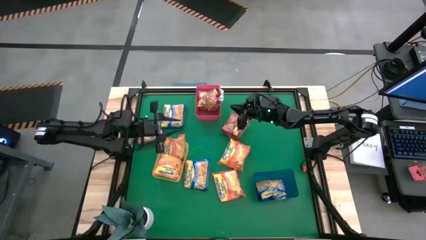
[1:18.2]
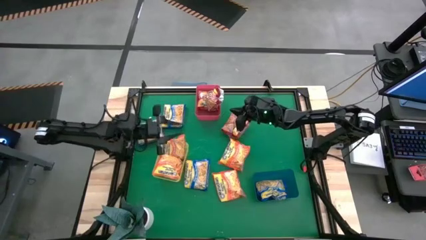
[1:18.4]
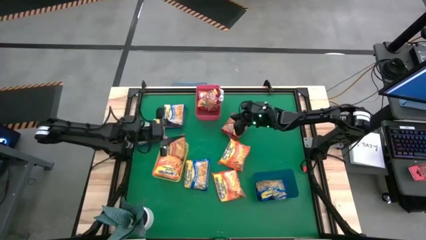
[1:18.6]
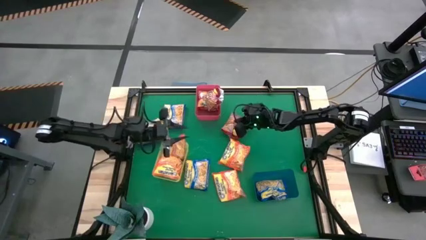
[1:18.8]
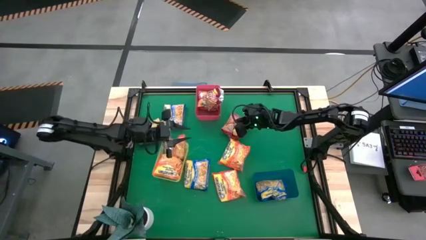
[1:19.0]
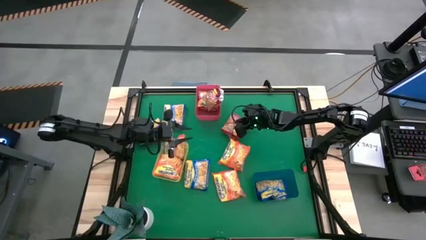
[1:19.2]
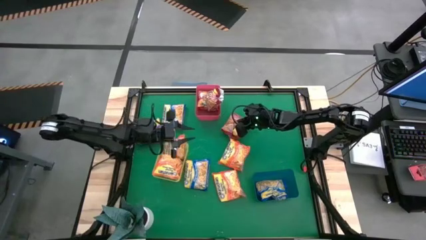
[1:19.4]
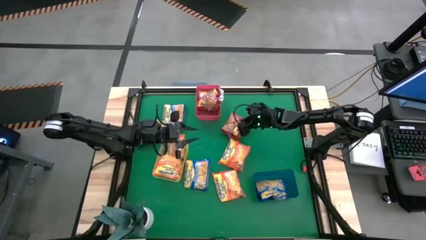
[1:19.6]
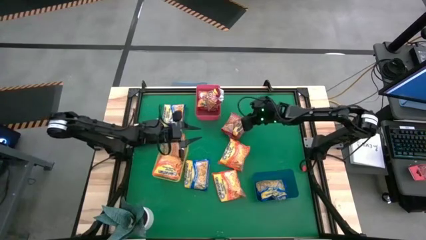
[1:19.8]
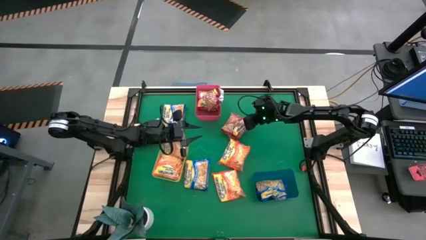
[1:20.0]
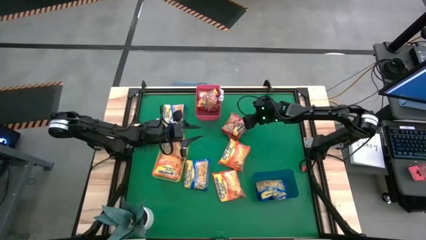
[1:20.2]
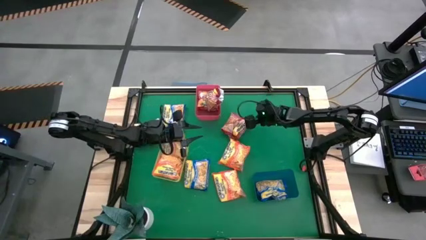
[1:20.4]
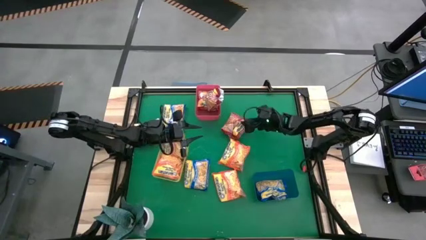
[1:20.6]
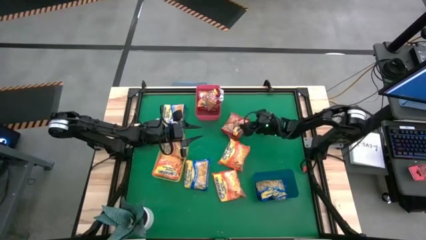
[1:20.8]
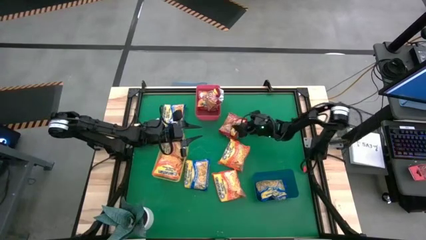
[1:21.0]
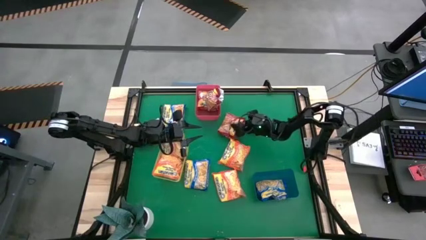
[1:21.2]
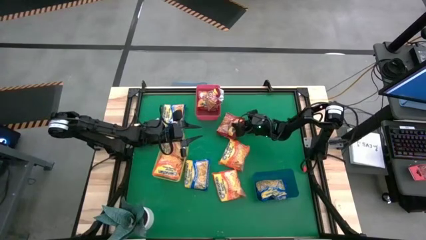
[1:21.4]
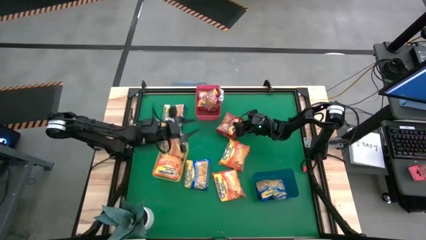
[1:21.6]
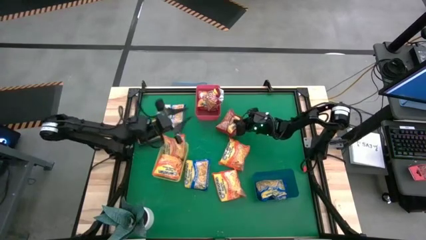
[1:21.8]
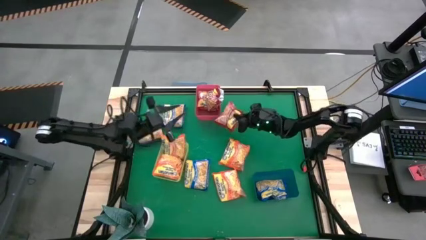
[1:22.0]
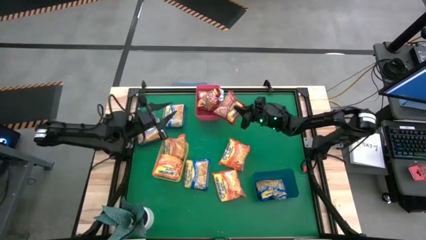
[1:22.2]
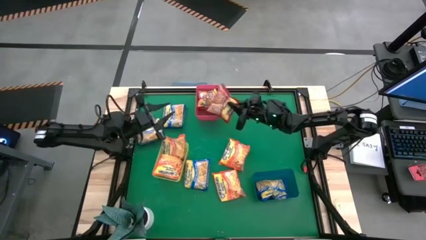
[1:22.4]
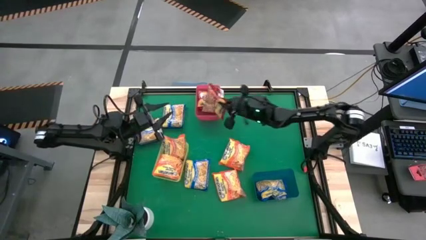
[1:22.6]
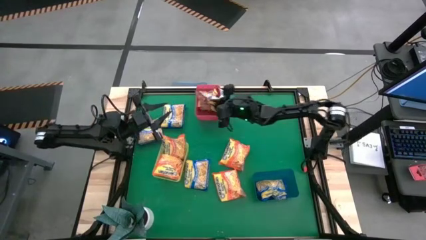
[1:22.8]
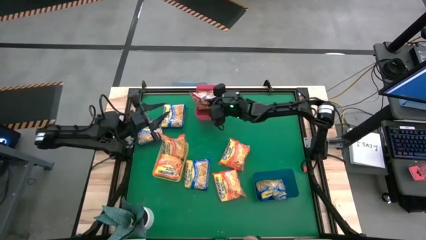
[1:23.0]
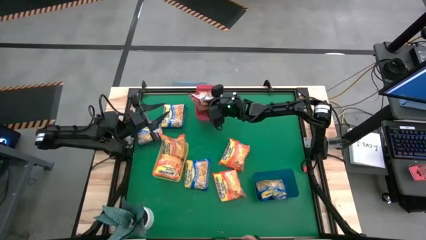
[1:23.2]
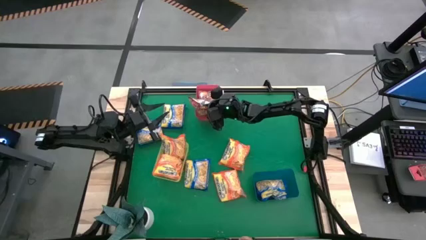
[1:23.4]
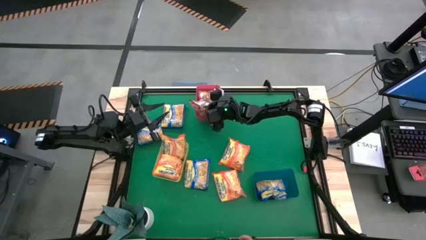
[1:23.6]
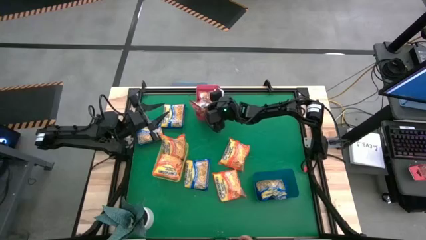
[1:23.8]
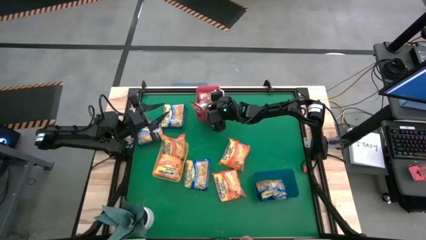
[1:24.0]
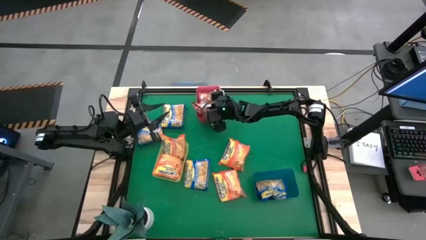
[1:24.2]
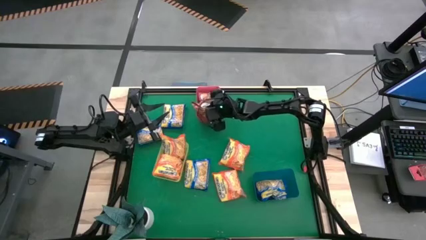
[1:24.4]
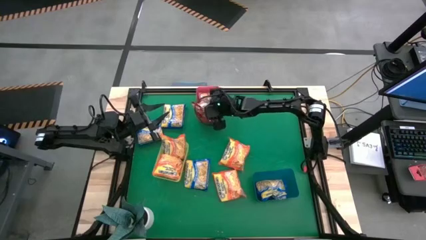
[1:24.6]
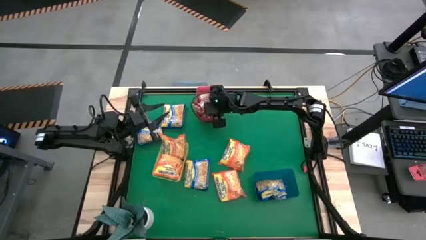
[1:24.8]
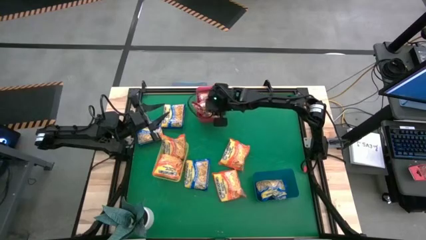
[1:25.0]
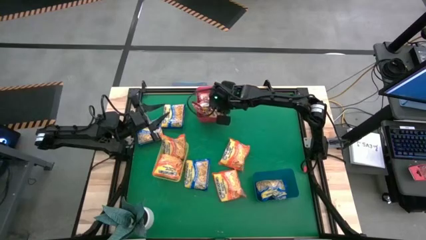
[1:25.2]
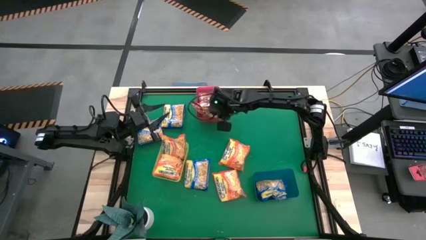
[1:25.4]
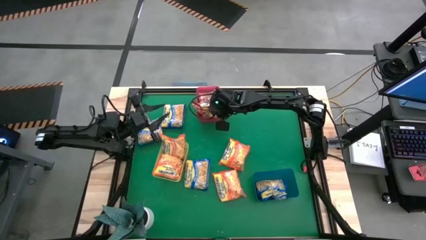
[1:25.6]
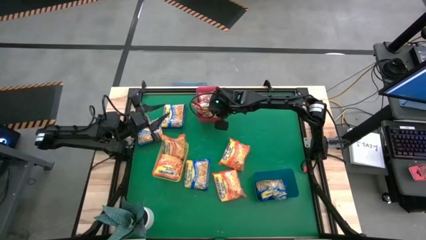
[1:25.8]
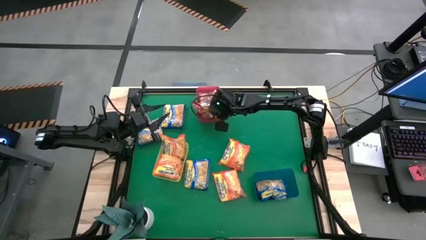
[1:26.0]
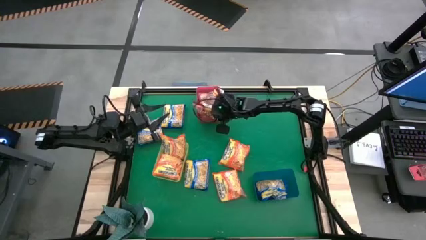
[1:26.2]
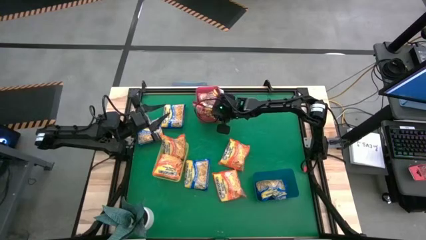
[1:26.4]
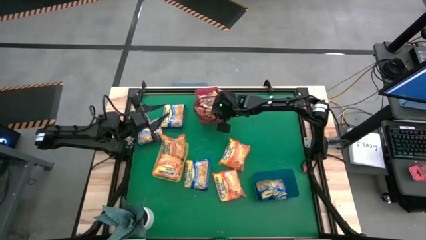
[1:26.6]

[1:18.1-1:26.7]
Task: Sort Maruchan noodles
Put the noodle pack into the red bin

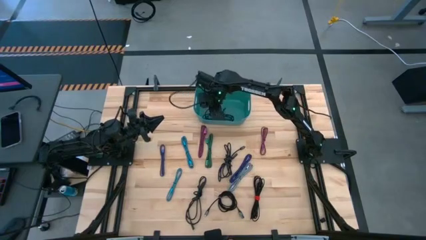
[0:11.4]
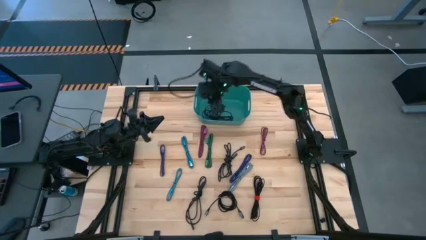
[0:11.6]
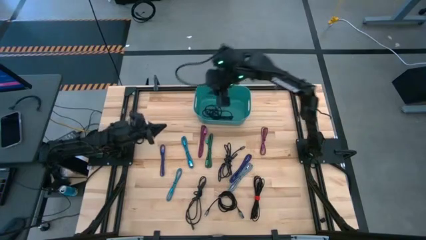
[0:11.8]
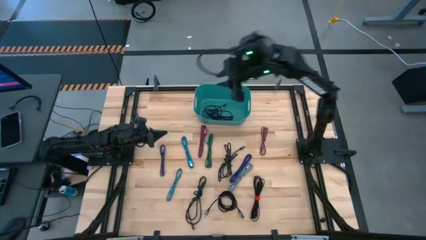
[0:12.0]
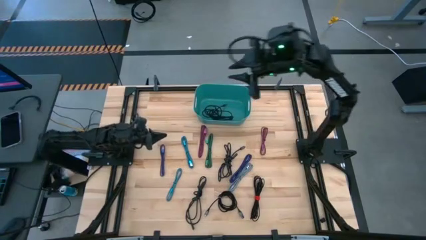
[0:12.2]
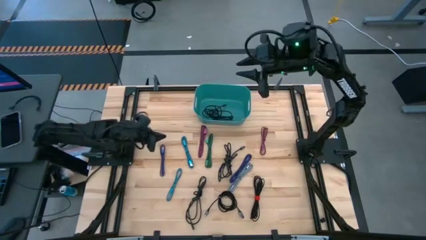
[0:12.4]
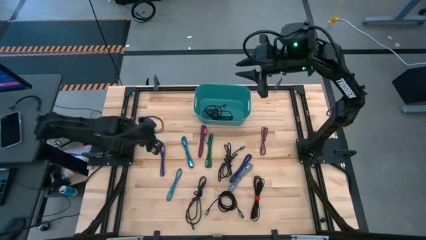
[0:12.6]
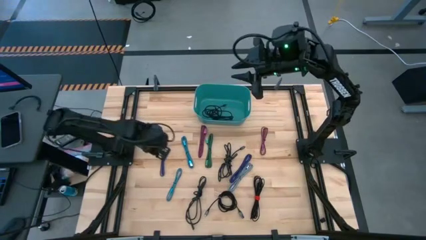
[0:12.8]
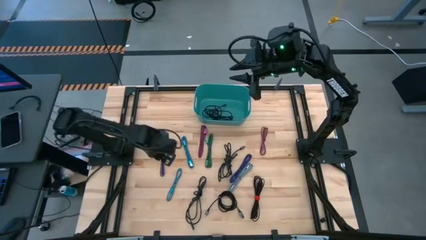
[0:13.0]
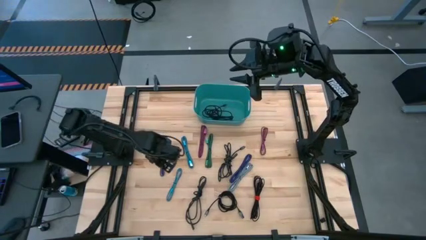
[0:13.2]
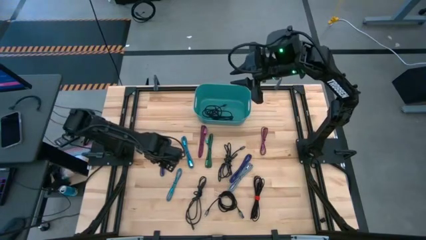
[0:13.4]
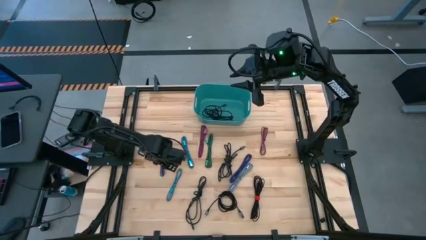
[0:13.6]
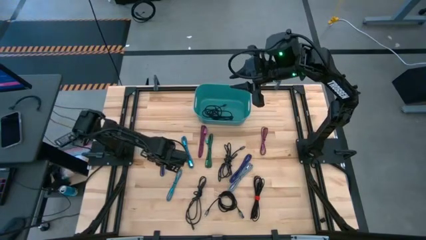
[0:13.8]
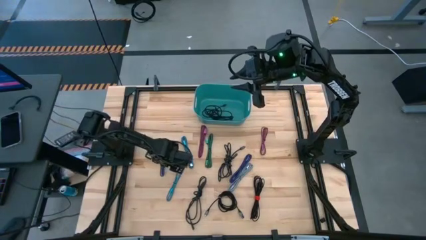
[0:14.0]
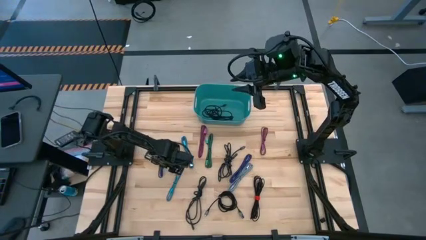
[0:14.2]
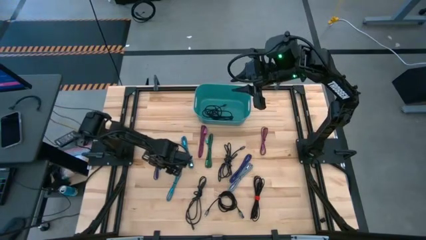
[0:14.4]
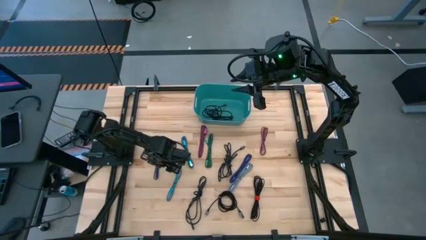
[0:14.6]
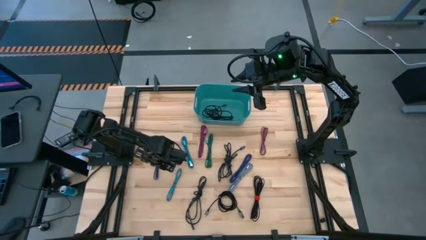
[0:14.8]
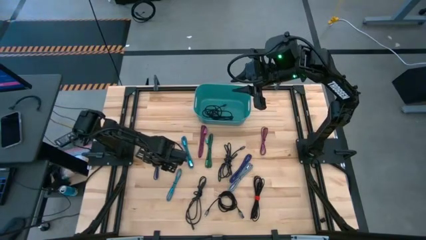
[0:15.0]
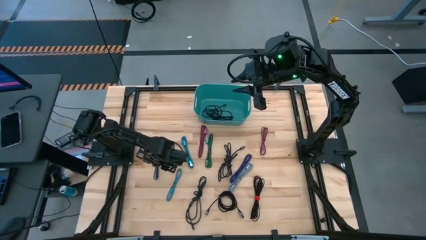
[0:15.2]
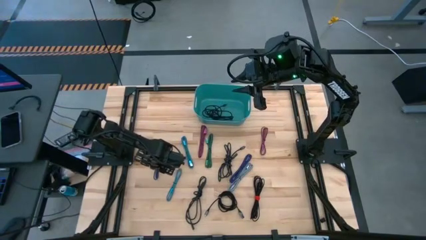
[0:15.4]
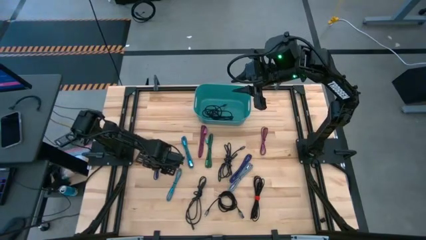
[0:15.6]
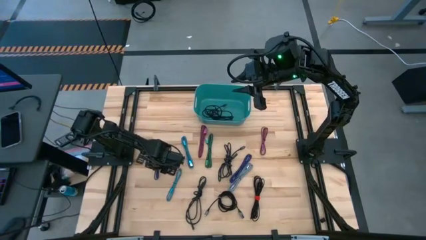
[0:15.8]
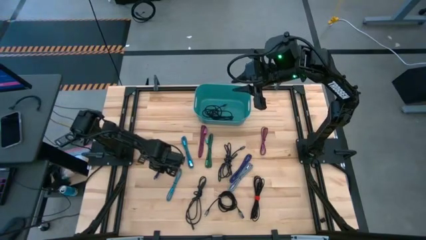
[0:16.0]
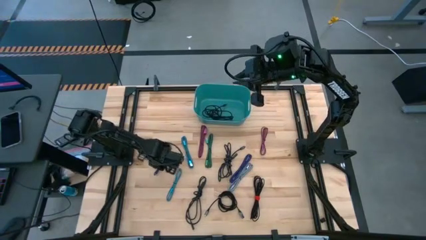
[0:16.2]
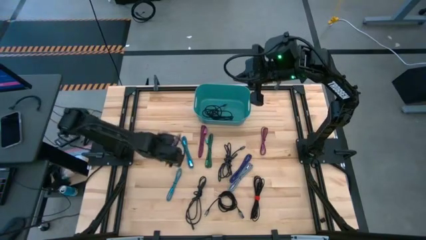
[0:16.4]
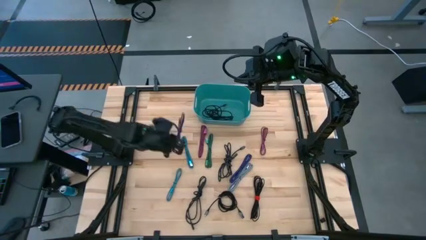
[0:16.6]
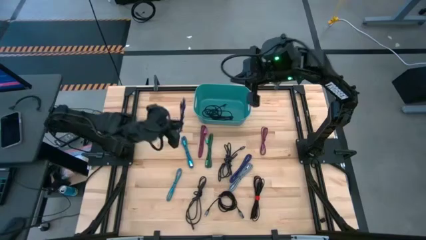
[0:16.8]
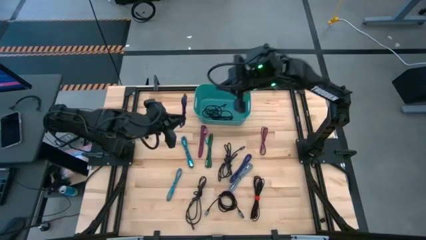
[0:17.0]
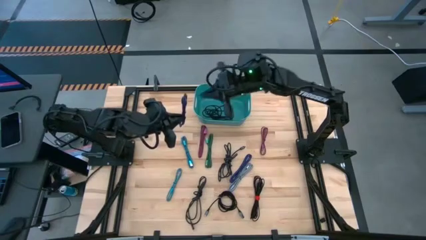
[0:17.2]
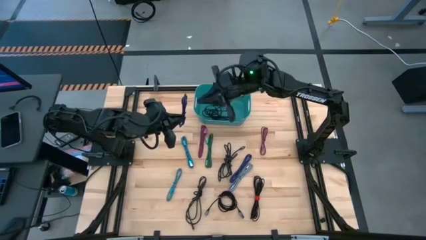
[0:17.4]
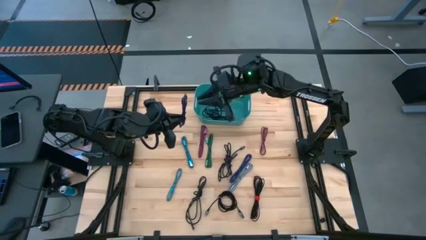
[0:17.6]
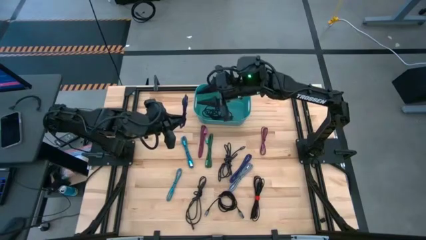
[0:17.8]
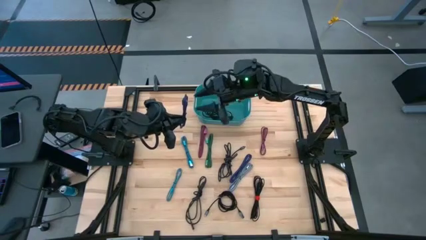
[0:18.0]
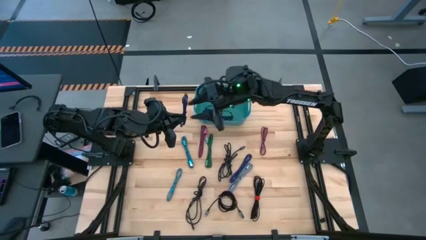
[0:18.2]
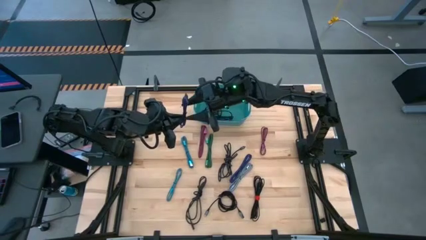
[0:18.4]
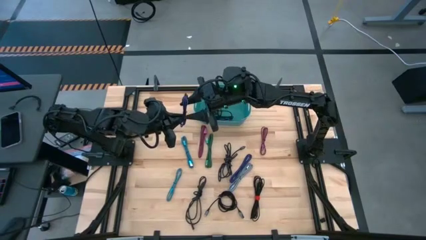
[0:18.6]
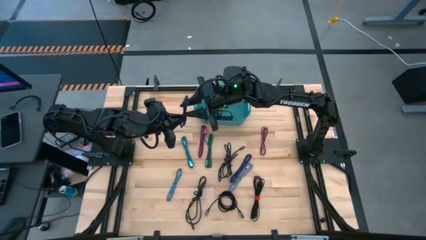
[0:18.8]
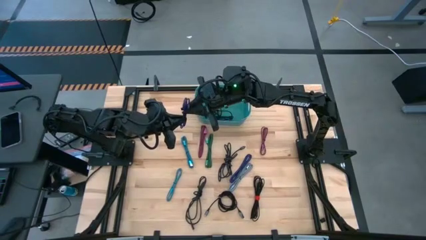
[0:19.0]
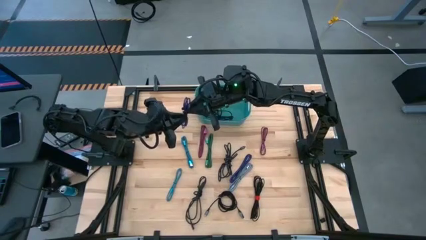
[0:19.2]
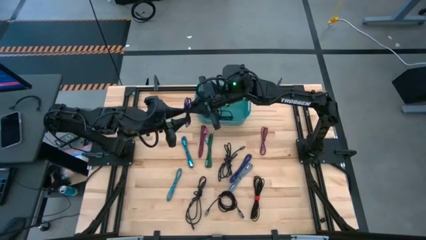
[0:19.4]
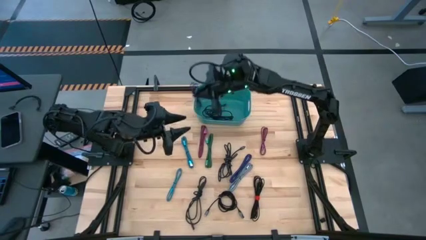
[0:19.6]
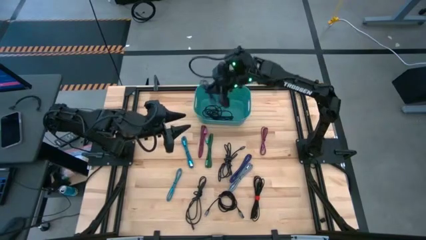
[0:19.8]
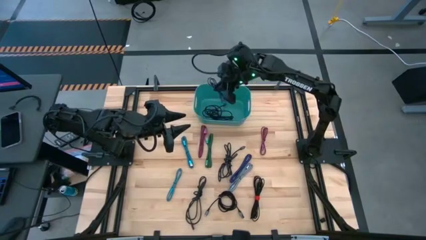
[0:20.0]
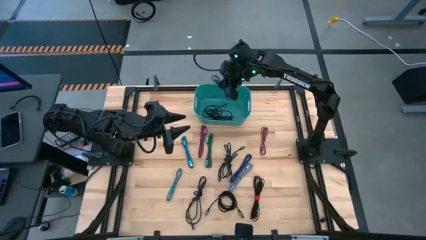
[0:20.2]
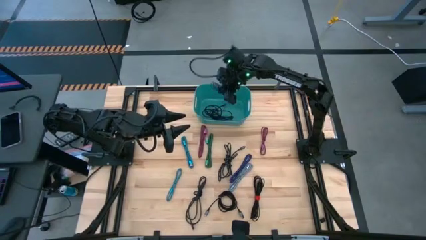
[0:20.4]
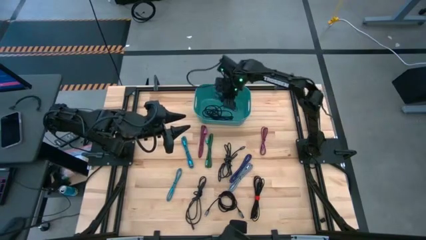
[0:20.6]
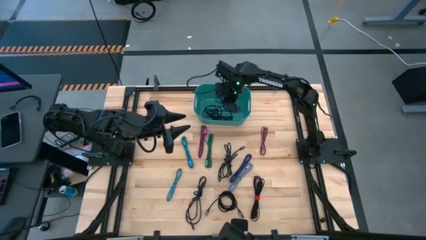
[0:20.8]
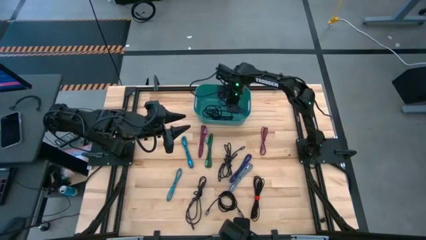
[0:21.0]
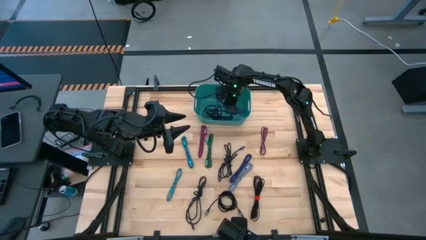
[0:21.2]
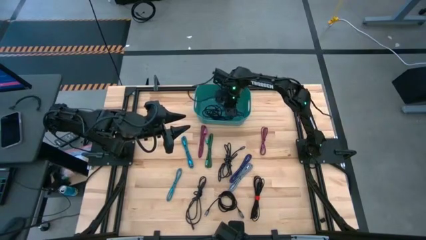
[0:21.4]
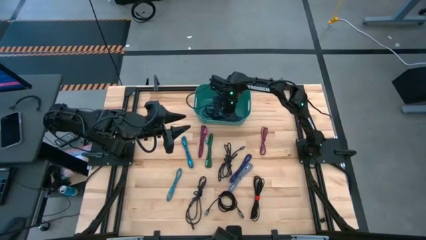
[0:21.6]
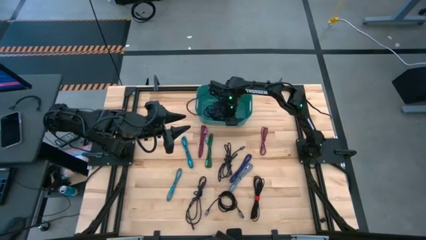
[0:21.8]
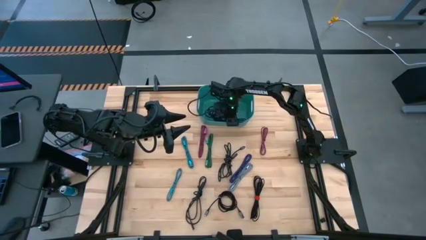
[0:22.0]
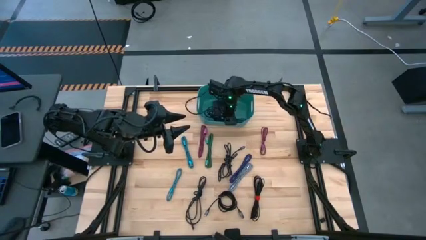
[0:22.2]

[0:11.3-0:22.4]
Task: Pick and place USB-C Cables
Put the left purple charger cable into the light blue bin
